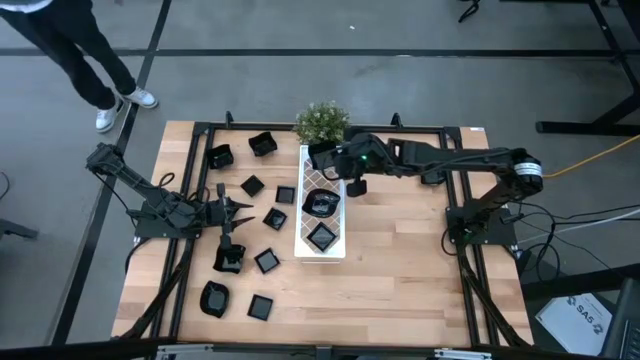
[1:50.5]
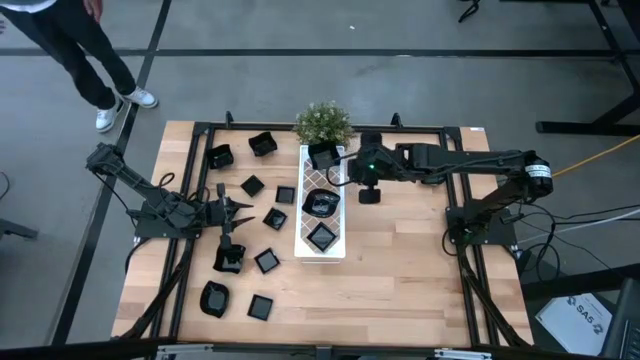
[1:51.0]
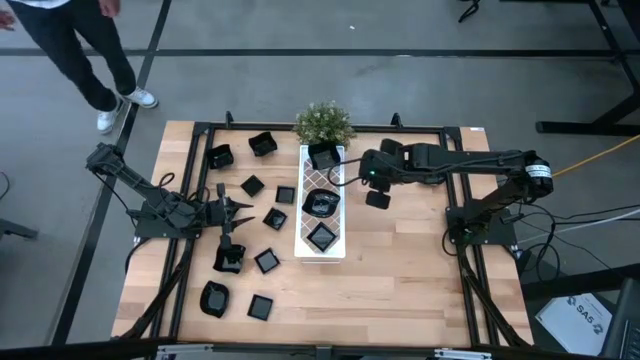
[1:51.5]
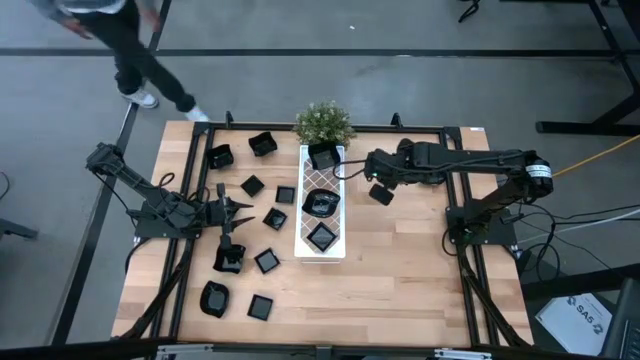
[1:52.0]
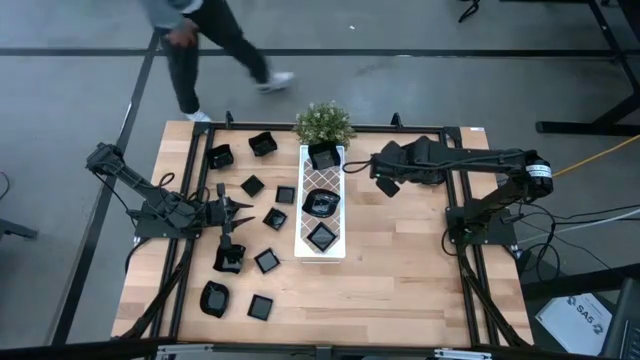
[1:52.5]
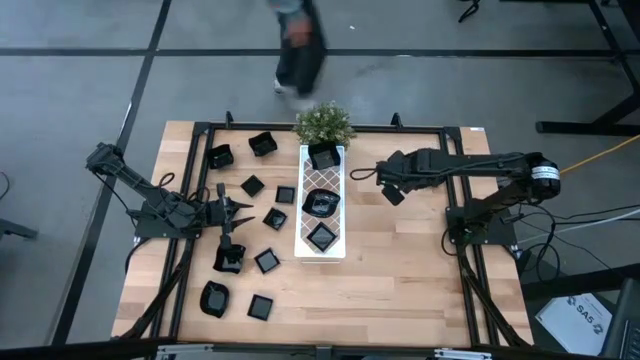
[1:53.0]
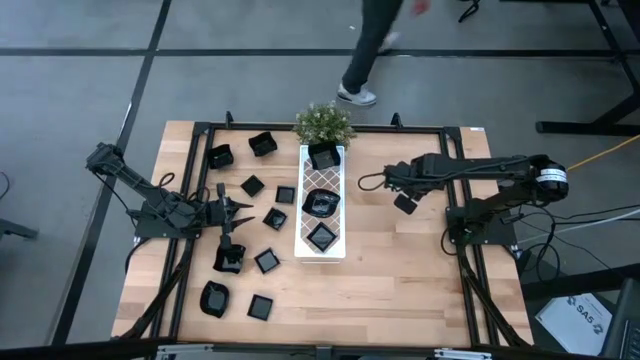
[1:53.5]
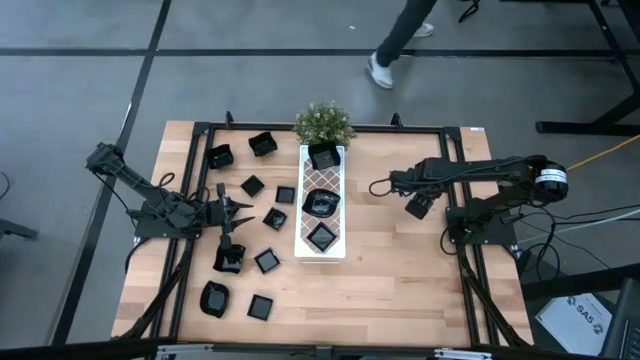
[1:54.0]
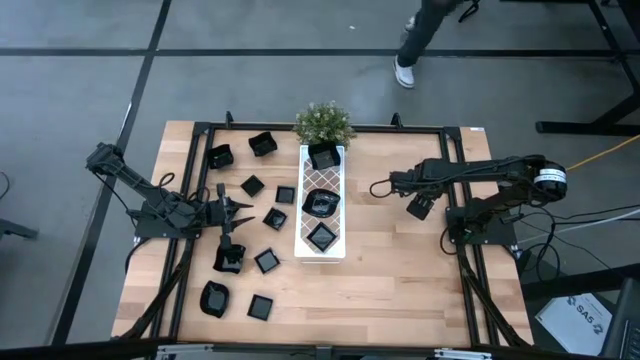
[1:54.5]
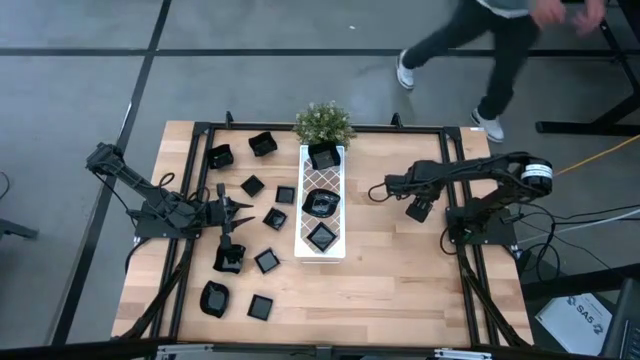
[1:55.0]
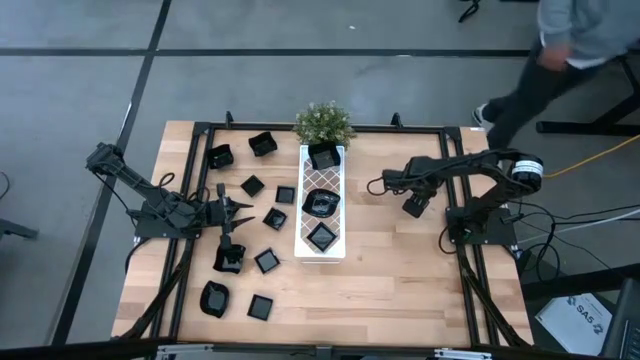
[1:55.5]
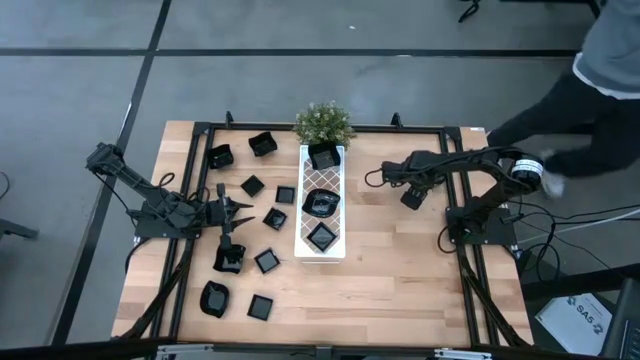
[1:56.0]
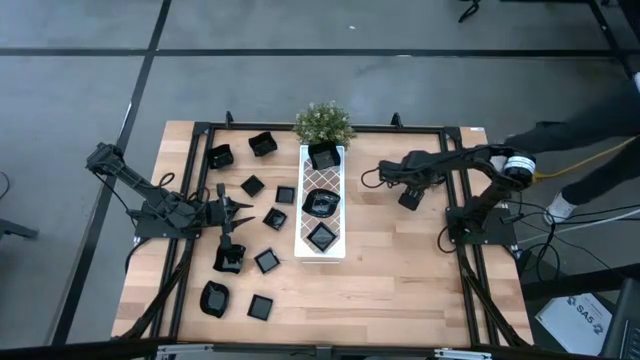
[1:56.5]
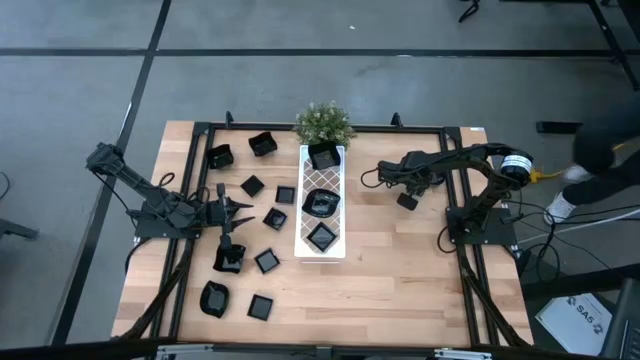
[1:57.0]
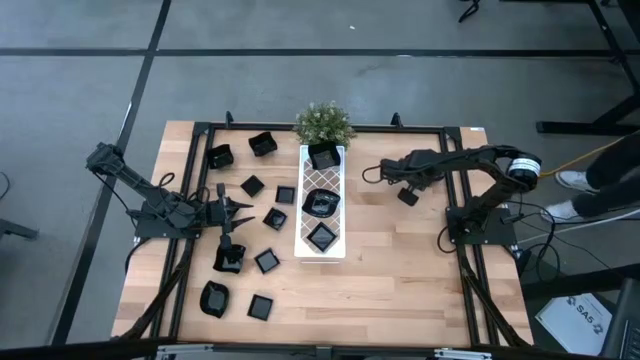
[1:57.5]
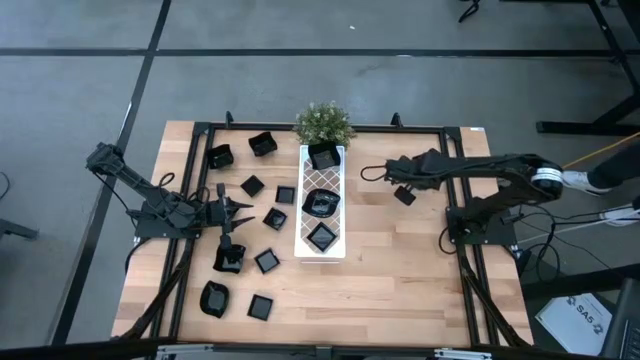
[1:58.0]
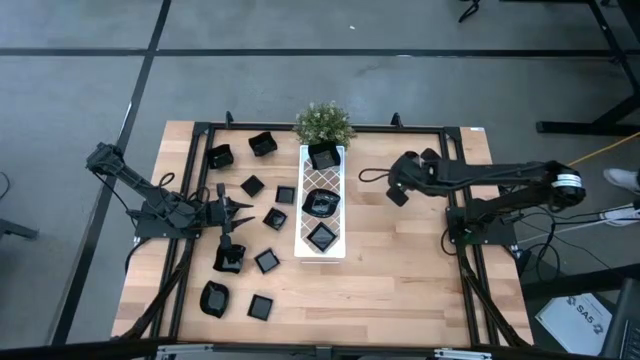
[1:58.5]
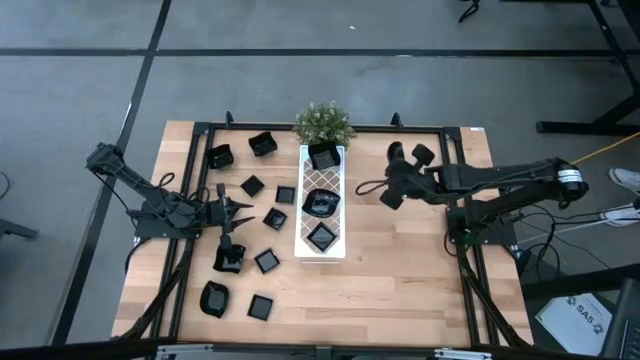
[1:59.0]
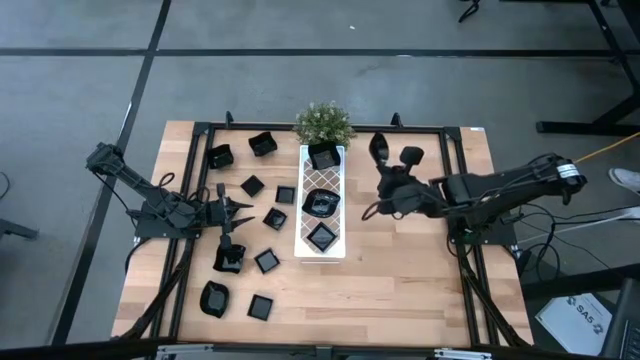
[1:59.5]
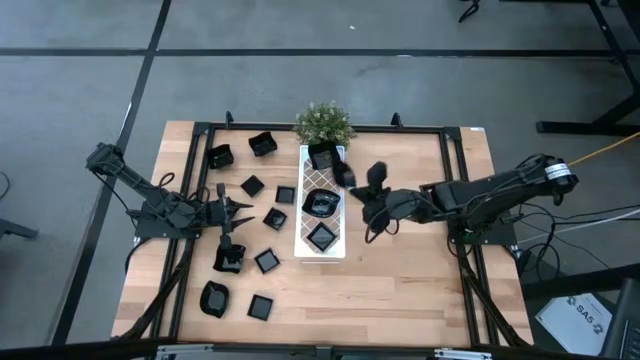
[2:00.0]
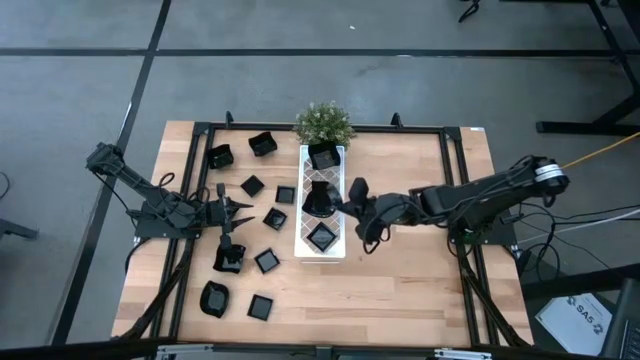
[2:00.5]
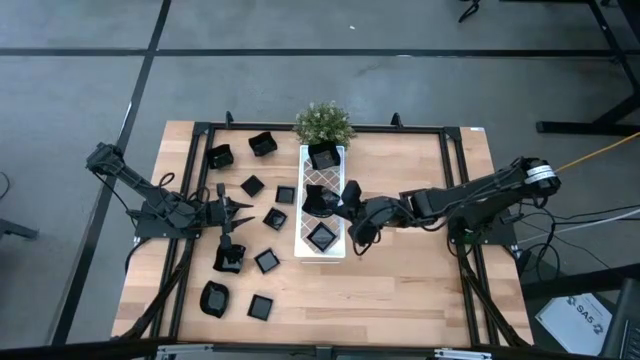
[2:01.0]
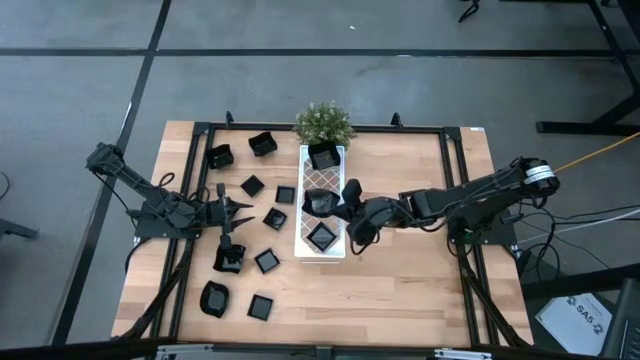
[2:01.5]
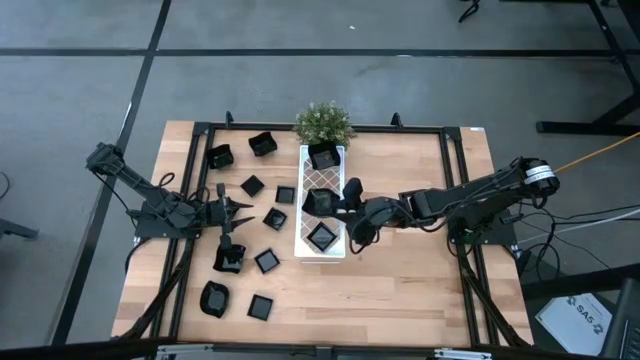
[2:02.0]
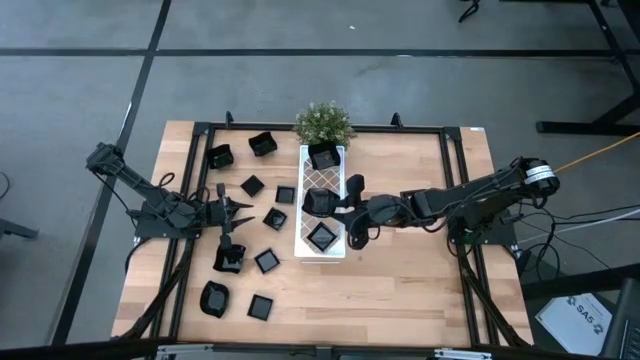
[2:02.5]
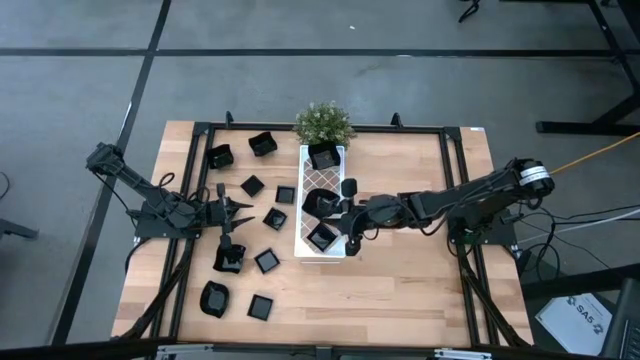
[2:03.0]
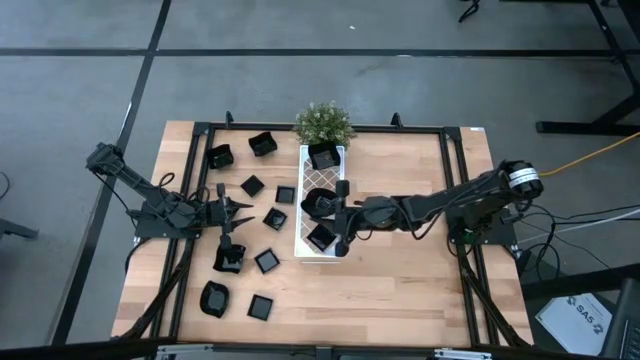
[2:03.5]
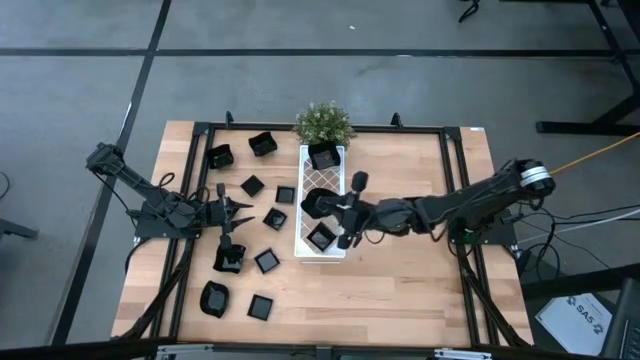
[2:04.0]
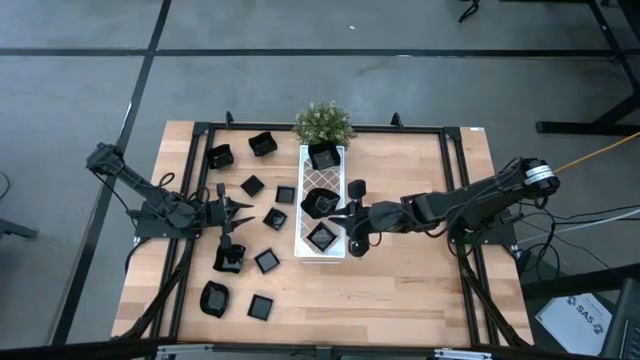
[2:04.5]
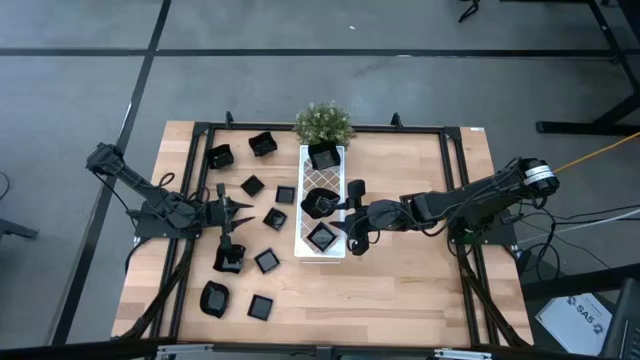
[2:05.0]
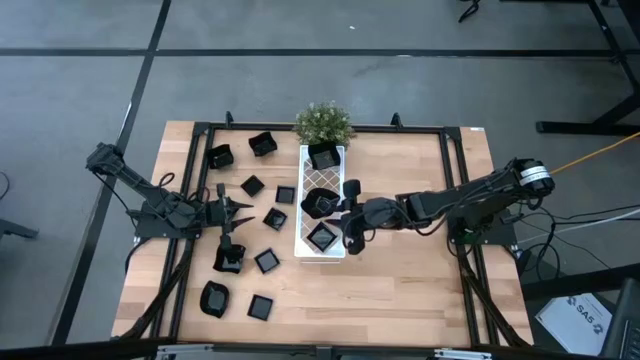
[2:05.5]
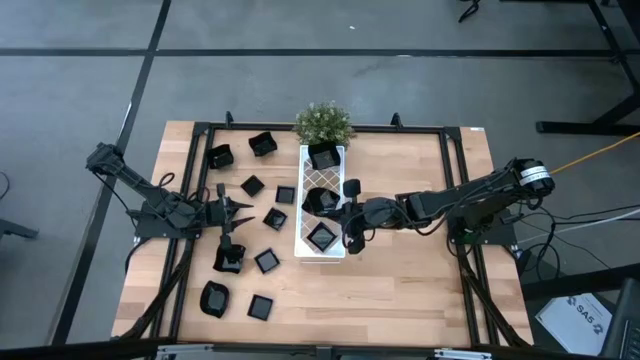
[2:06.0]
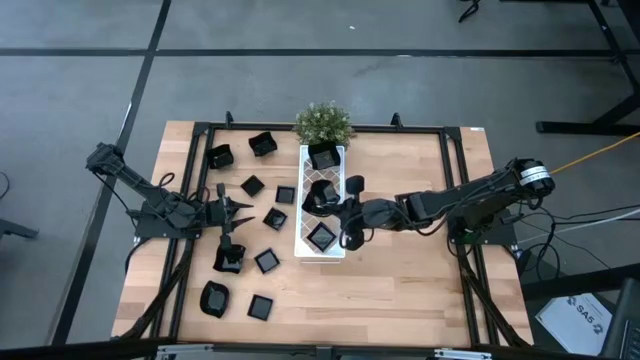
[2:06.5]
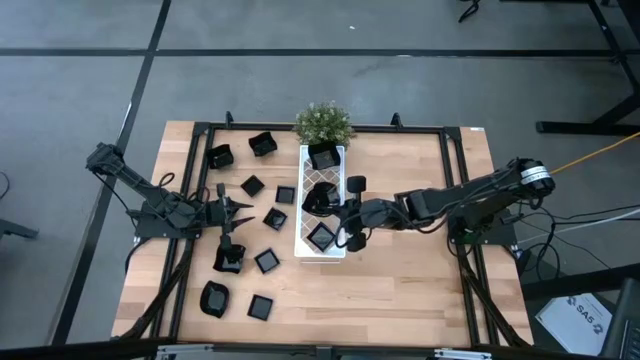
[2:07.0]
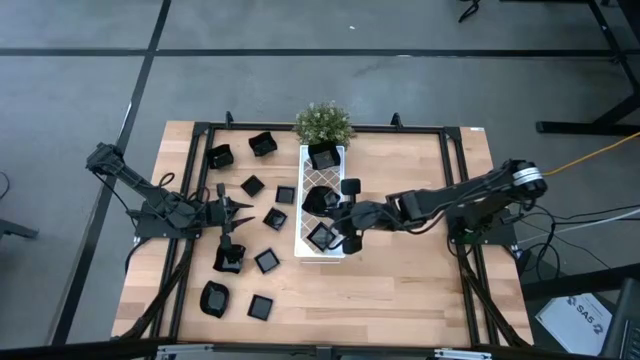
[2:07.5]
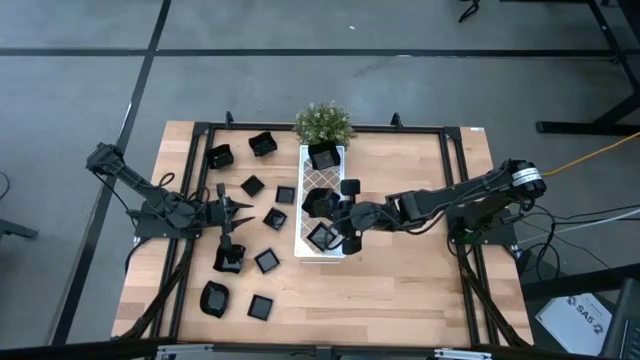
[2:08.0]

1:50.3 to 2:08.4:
Task: Pick & Place Mini shaped plates
Stack the leaf shape plate on top of the leaf shape plate on the shelf

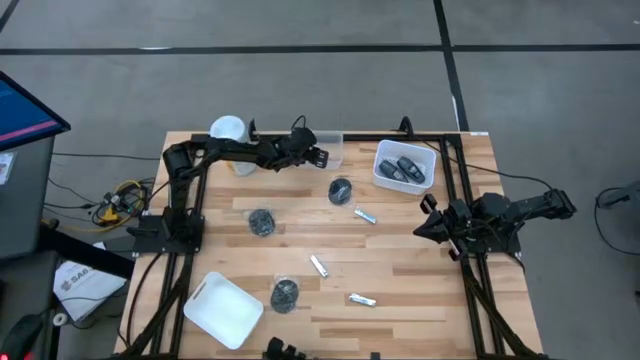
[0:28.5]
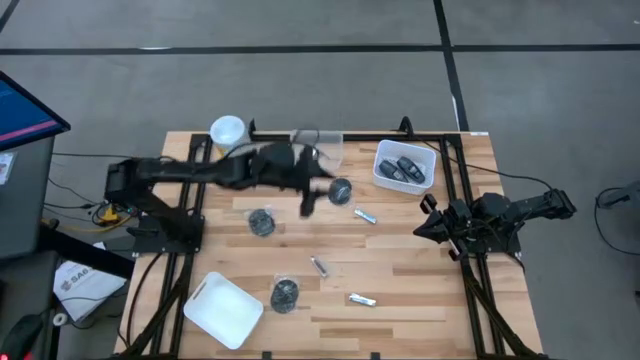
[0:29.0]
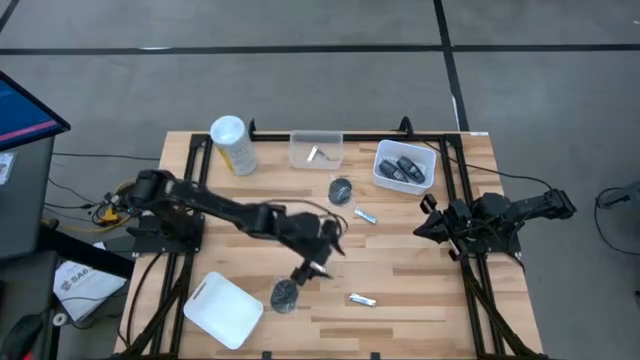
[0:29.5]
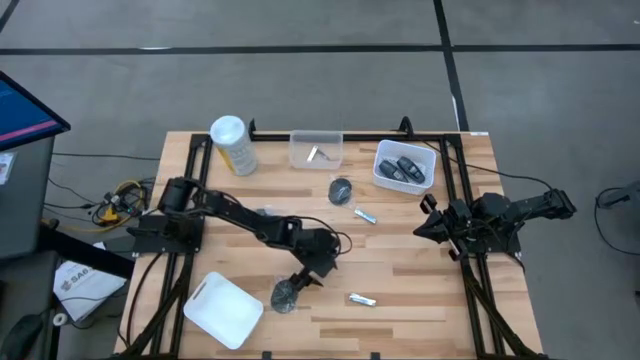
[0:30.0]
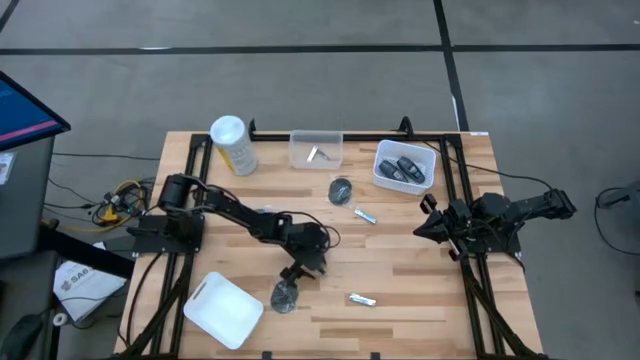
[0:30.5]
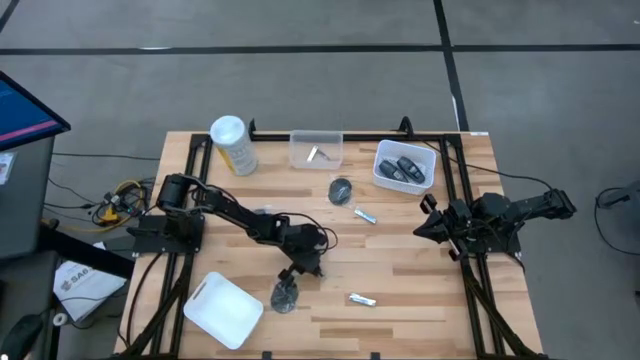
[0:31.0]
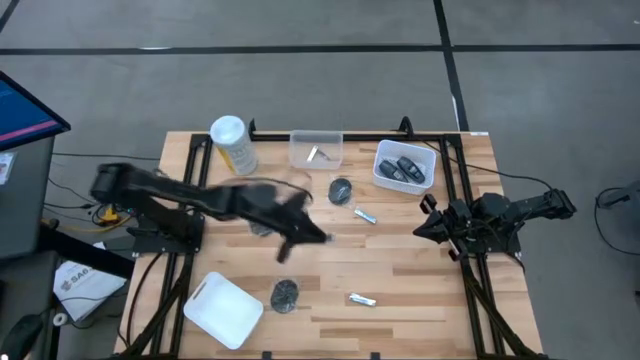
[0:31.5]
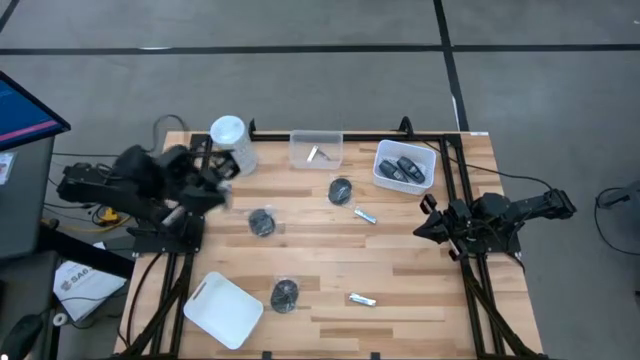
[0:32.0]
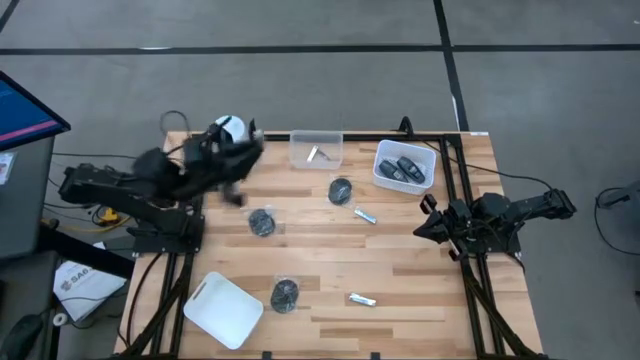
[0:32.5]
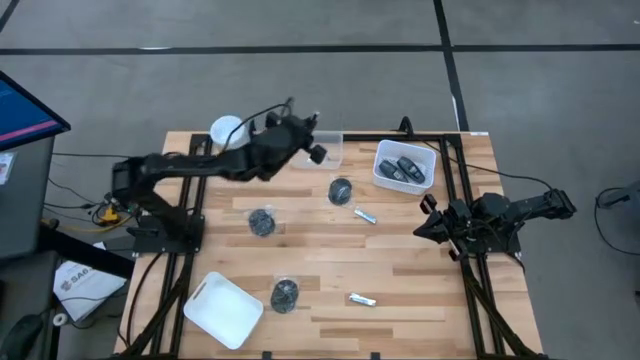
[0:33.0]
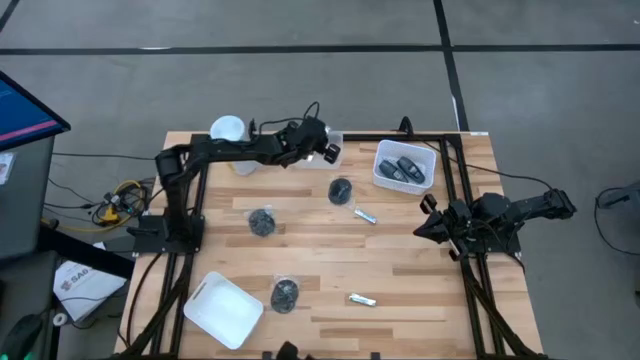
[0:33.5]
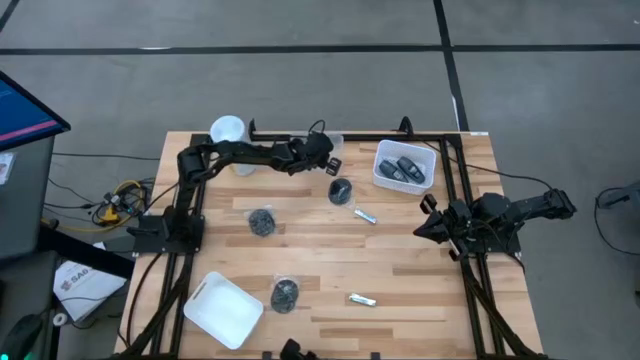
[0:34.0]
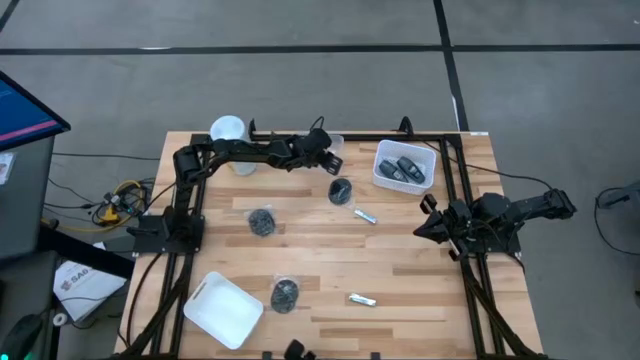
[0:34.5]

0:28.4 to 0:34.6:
Task: Pick & Place Travel size toiletries
Put the silver nail cutter into the transparent bin
